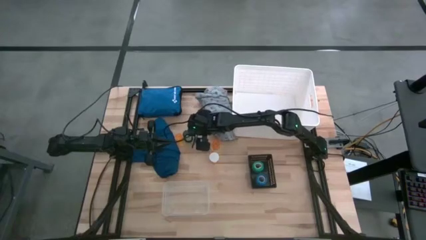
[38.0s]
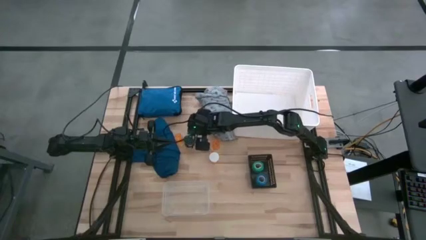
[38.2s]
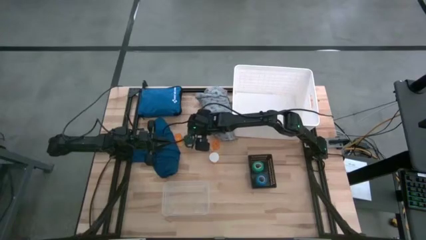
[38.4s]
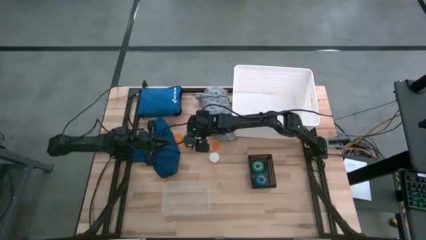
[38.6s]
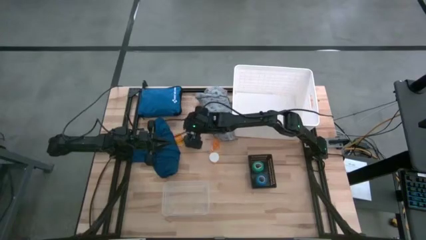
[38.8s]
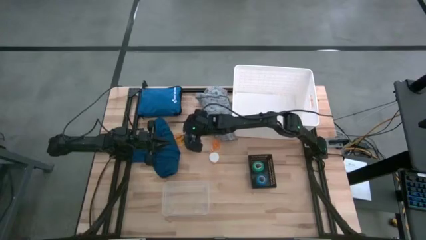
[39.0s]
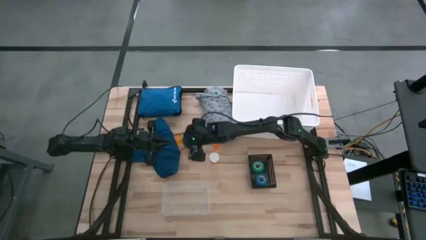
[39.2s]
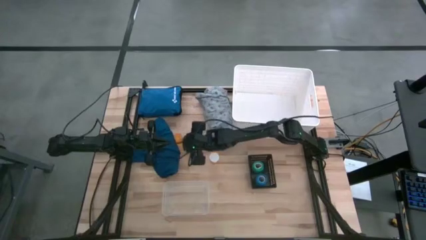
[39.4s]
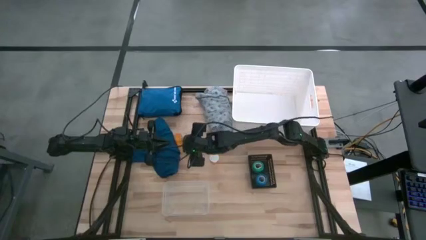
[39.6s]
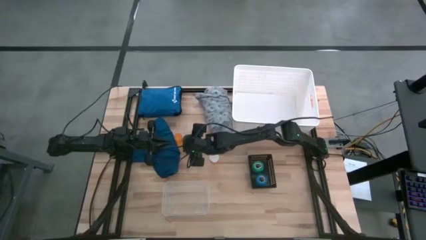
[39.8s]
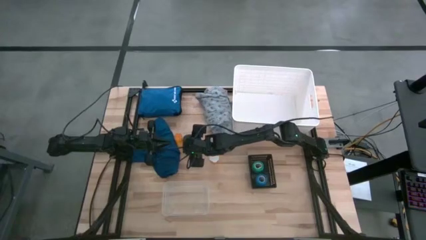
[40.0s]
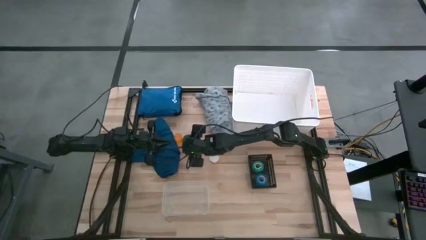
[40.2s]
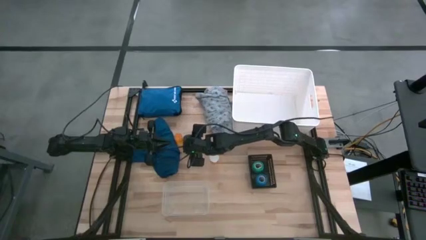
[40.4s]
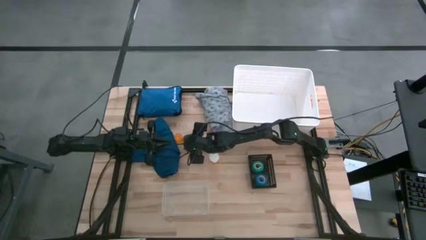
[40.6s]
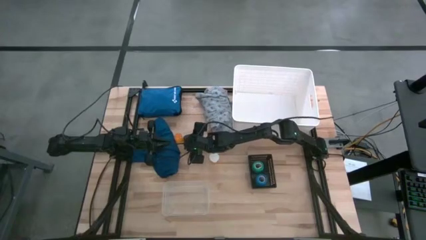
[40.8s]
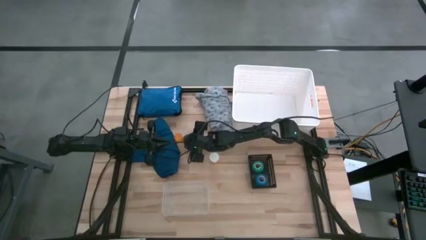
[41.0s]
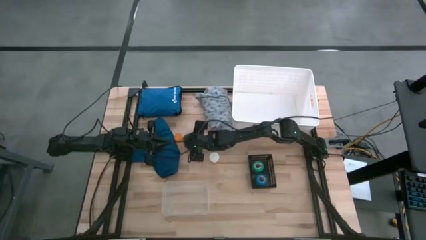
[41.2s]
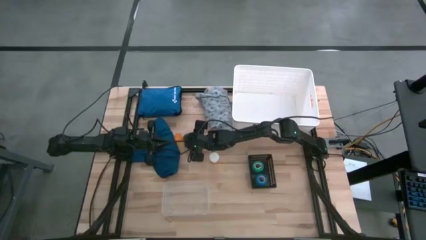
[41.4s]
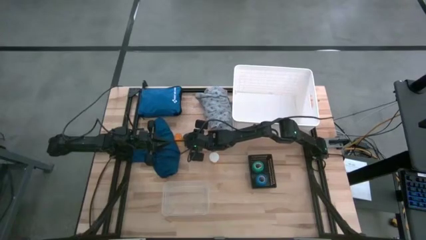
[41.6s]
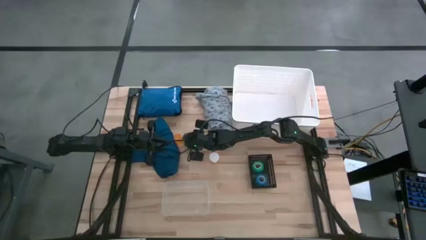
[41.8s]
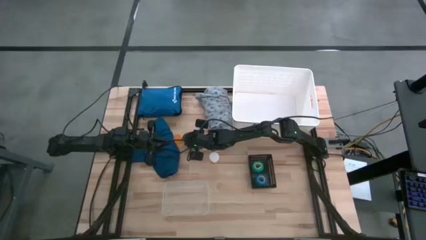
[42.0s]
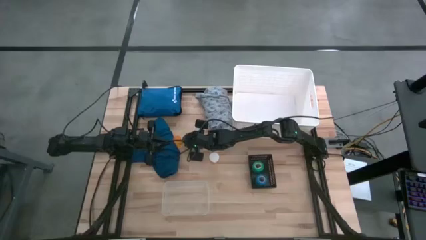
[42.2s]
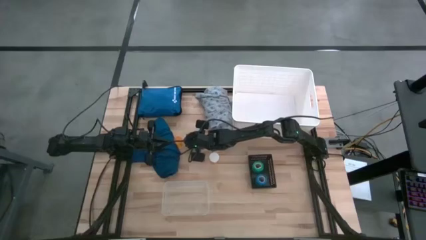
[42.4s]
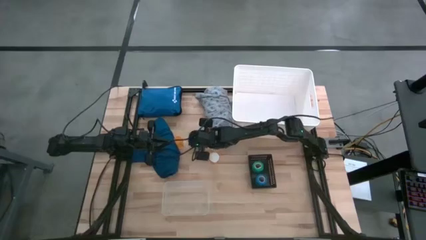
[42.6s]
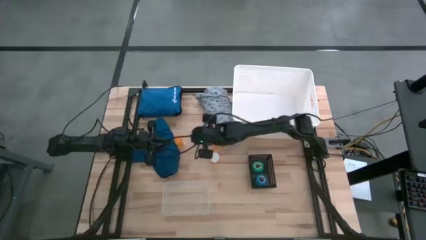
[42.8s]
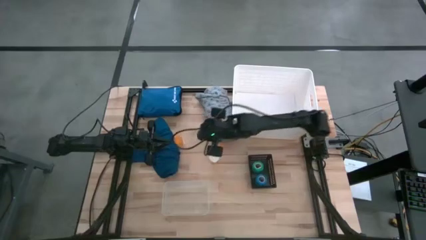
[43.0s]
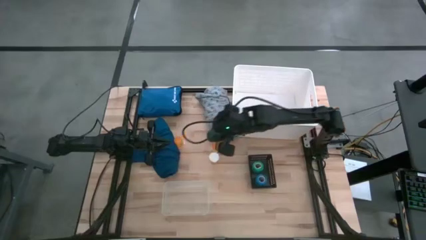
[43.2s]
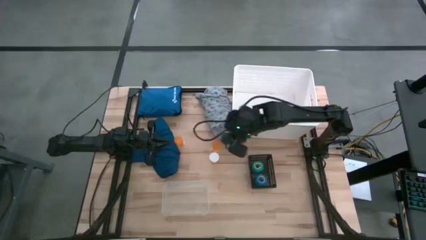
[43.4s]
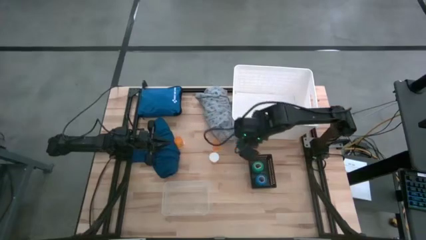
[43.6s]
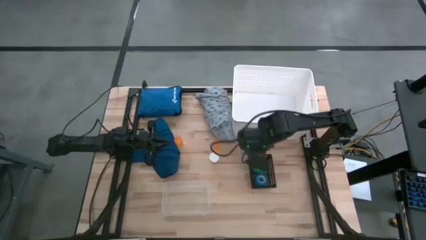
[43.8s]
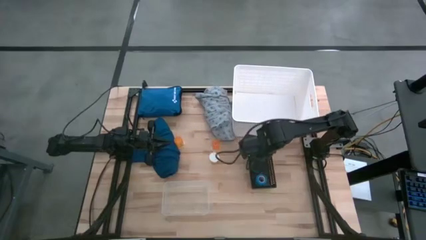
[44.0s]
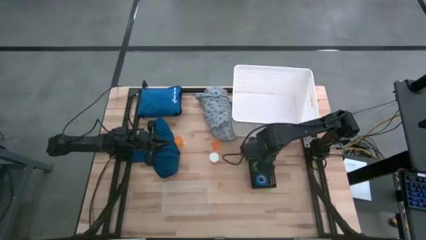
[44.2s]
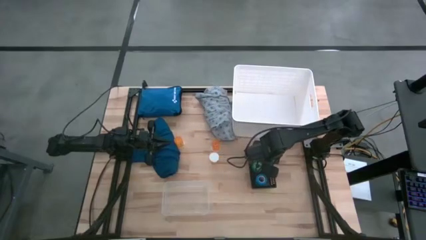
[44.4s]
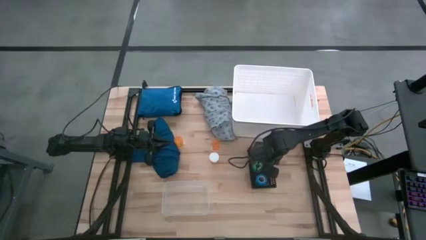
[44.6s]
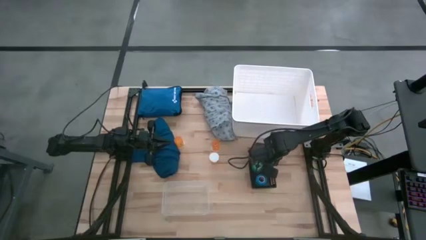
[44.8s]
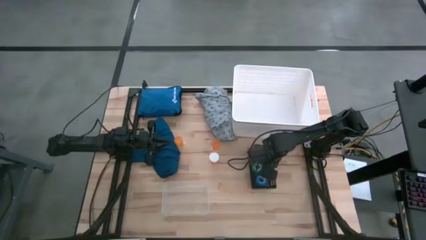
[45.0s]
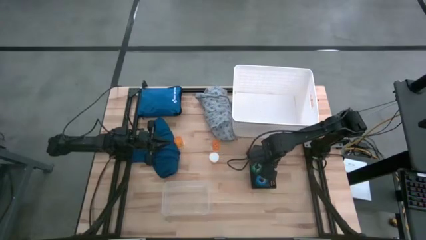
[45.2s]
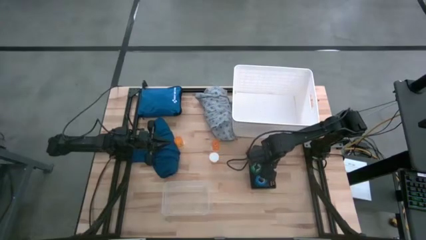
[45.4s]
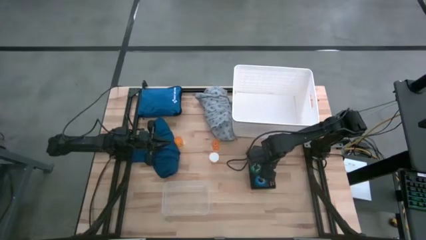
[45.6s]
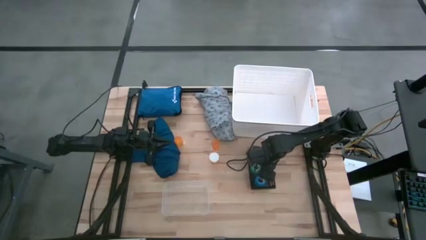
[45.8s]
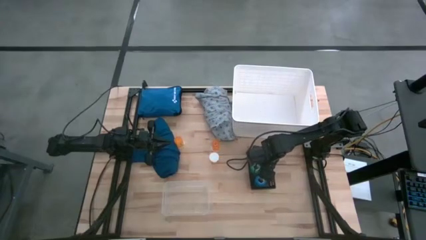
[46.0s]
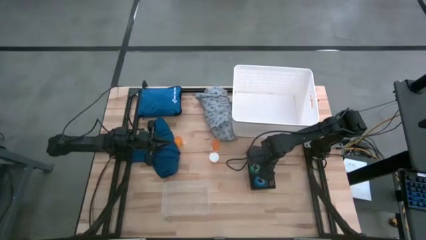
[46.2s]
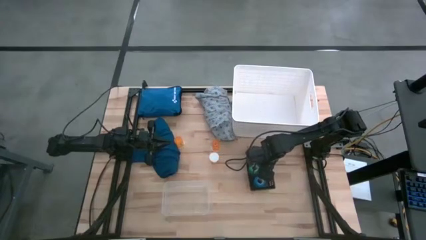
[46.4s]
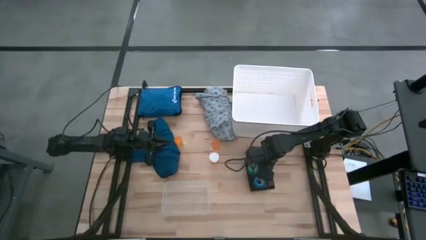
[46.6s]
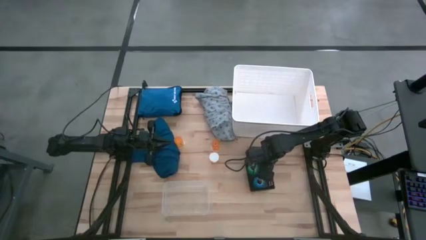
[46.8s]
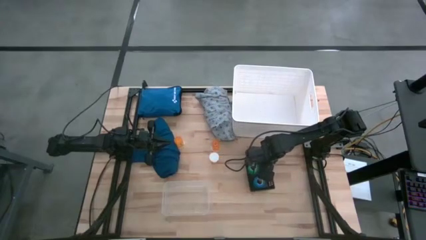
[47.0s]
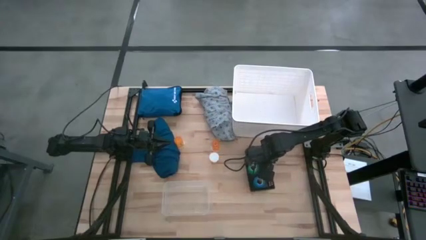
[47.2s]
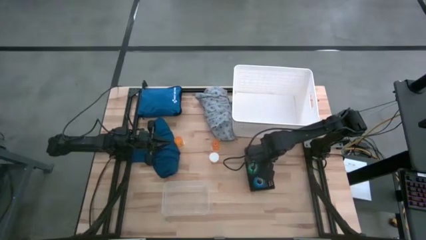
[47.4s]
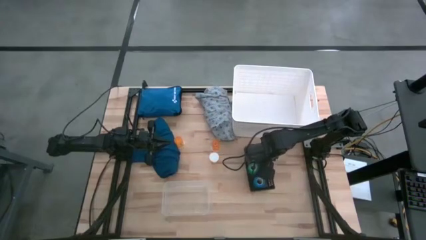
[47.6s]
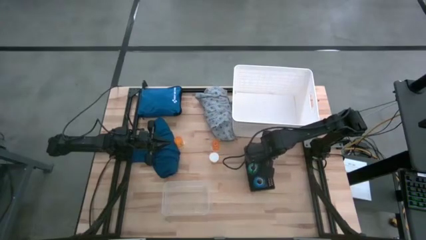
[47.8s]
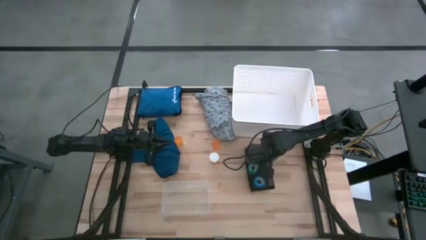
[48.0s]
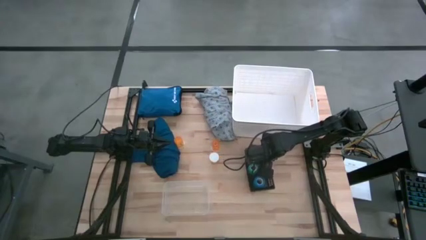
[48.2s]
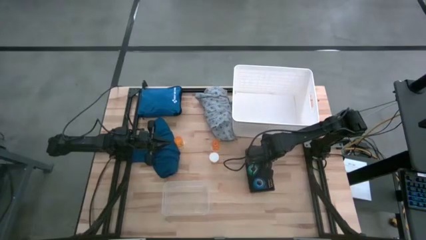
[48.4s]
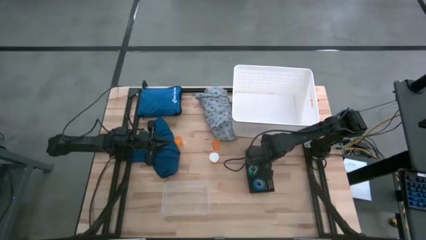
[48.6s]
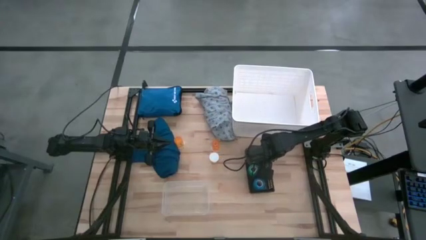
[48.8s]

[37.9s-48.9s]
Task: Pick & place medical supplies in basket/bin
Put the green bandage into the black bin

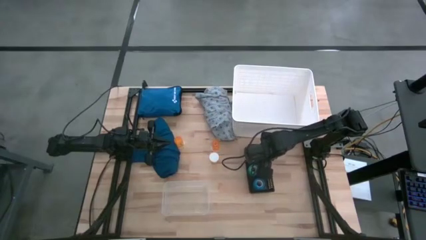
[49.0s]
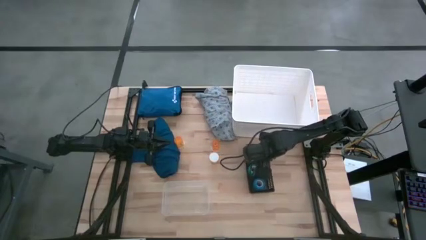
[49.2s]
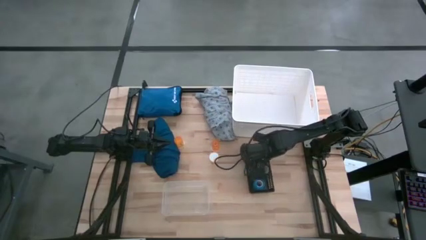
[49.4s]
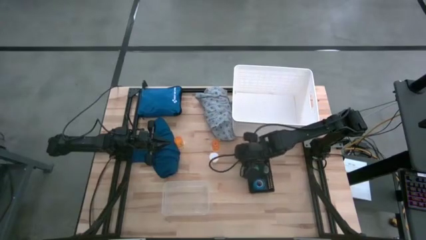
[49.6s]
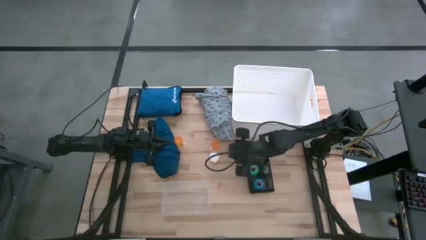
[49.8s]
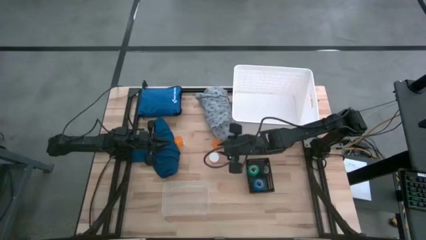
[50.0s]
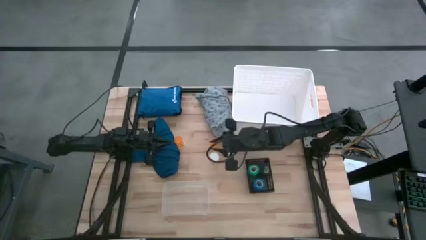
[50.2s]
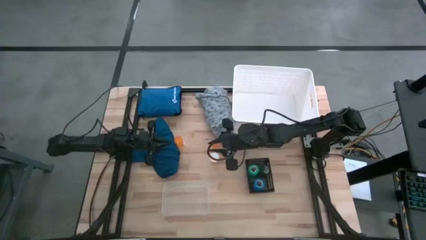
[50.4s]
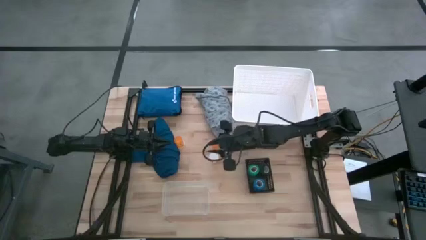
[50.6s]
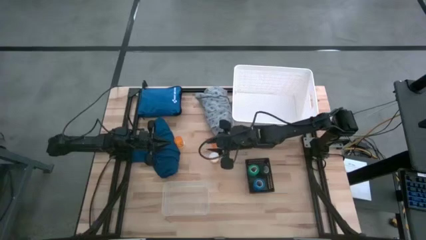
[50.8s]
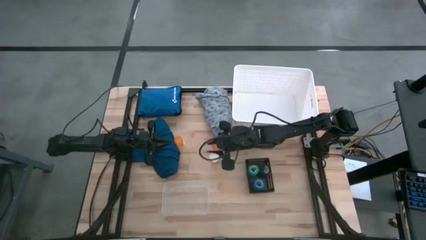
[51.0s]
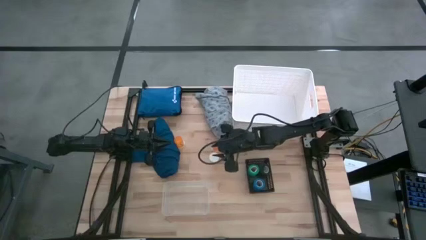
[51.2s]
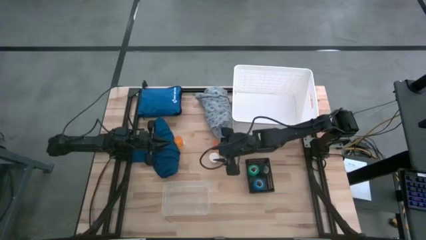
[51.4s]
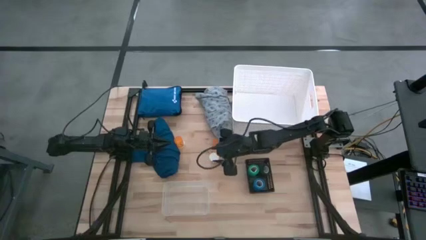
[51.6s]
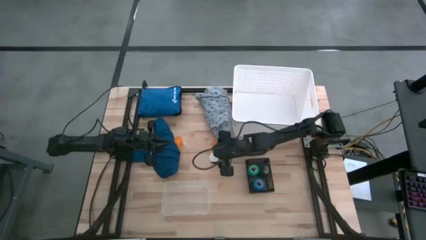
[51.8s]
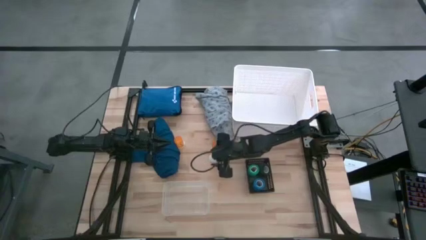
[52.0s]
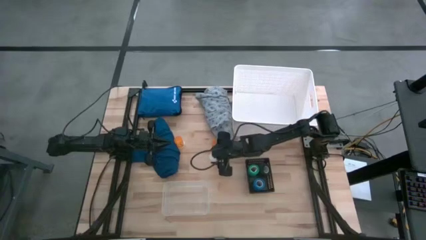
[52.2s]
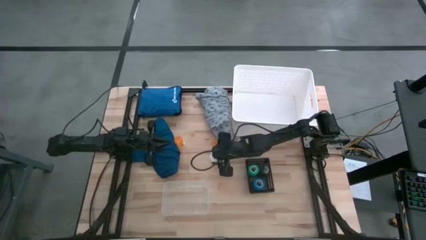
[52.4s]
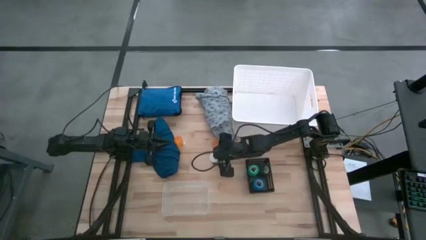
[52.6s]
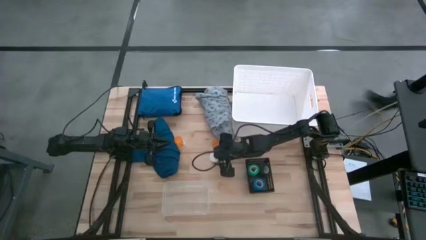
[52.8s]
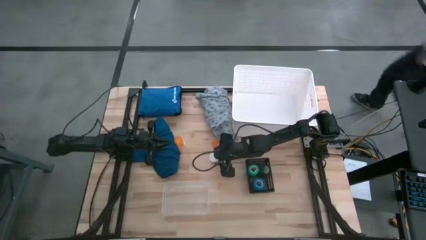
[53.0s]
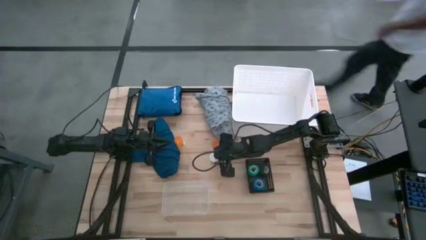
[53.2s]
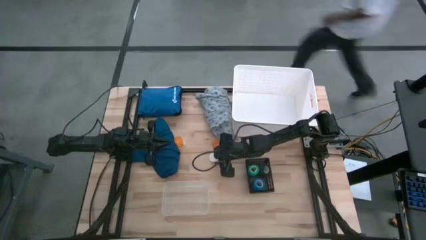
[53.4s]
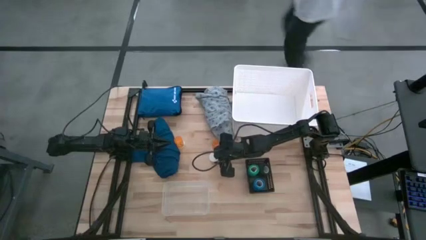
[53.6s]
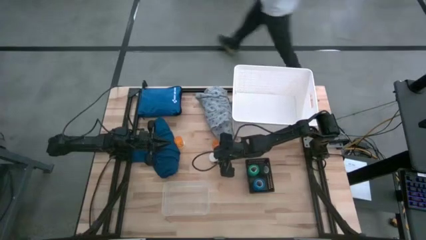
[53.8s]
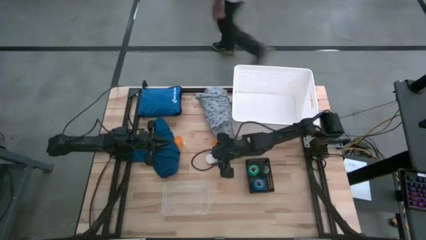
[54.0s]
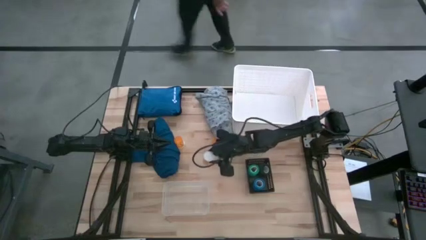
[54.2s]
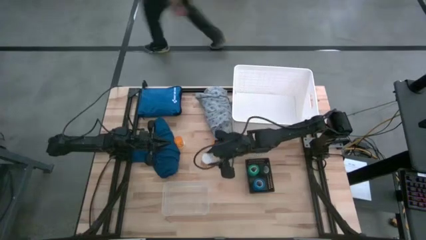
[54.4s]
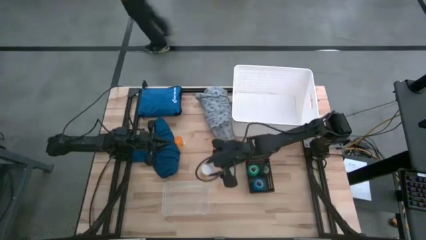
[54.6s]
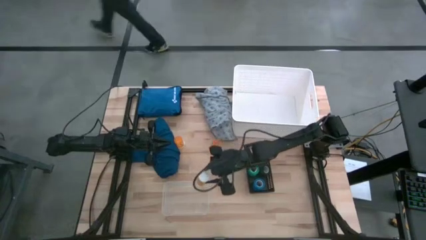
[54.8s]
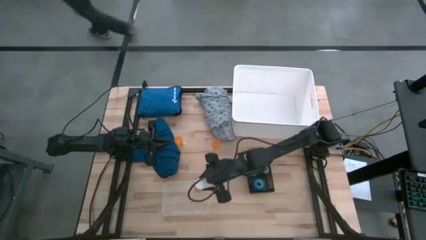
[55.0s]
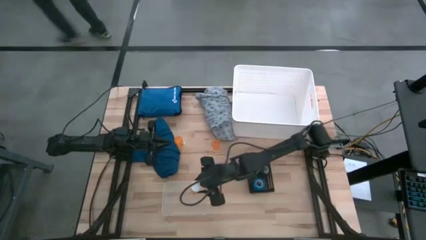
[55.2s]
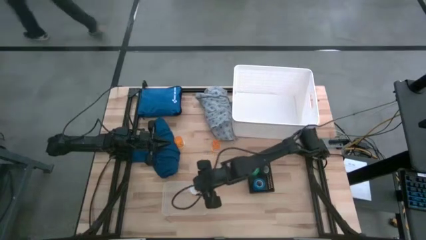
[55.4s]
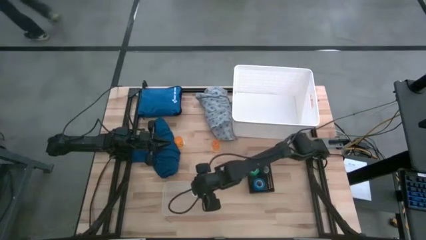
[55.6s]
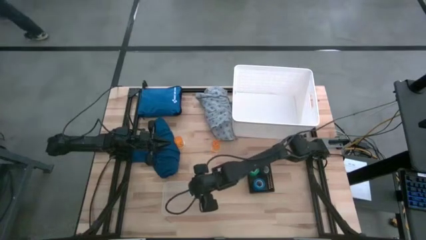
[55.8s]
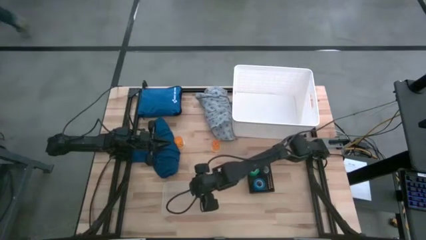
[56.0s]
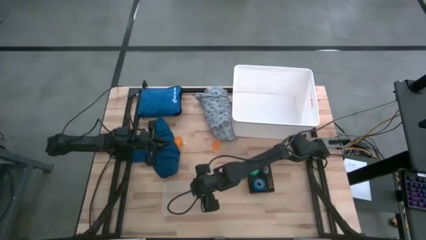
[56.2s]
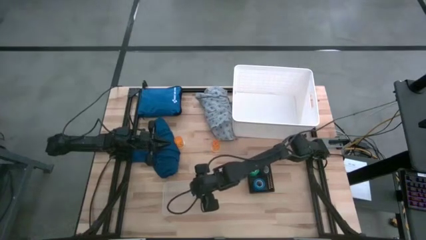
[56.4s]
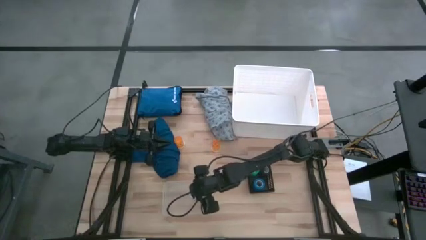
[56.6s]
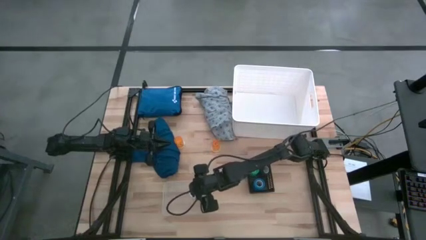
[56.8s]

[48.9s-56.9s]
Put the bottom orange pill bottle into the transparent bin
